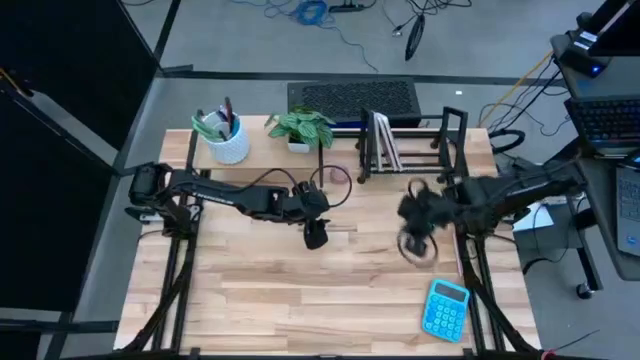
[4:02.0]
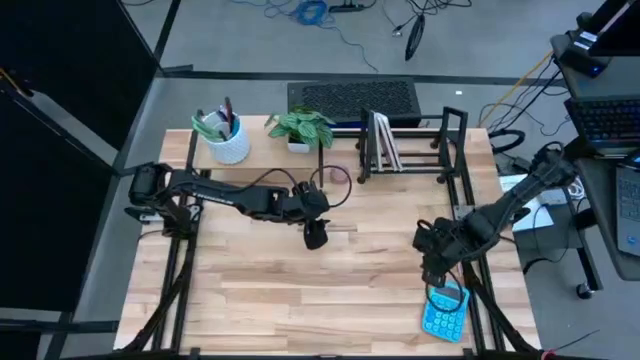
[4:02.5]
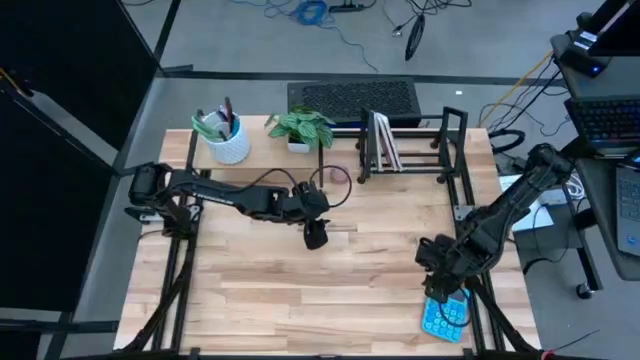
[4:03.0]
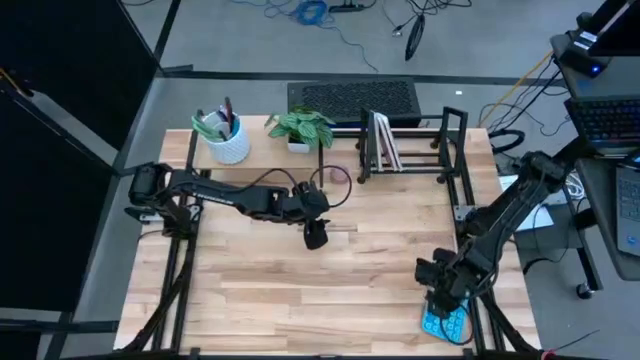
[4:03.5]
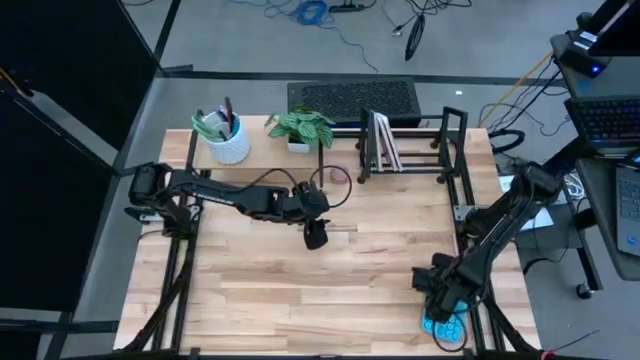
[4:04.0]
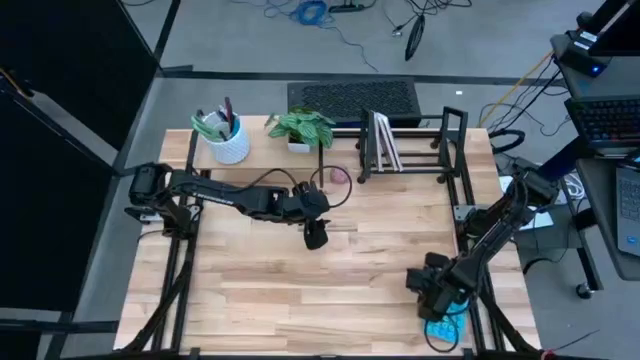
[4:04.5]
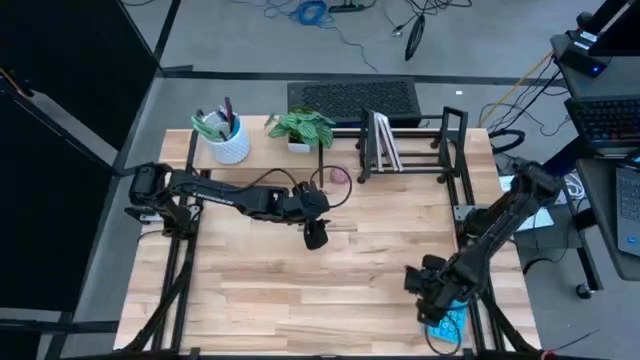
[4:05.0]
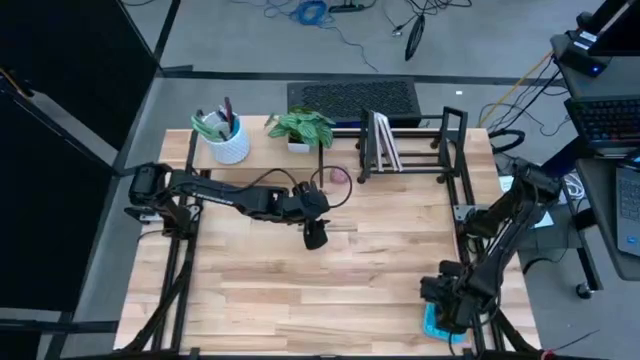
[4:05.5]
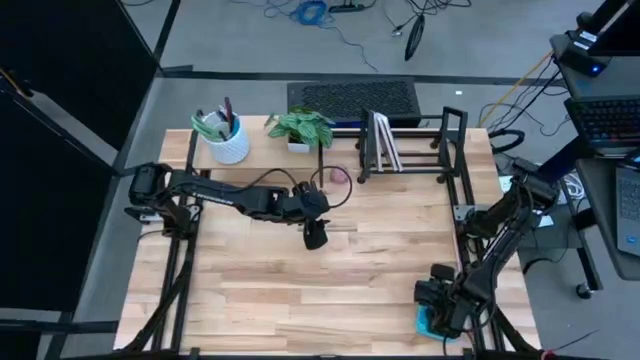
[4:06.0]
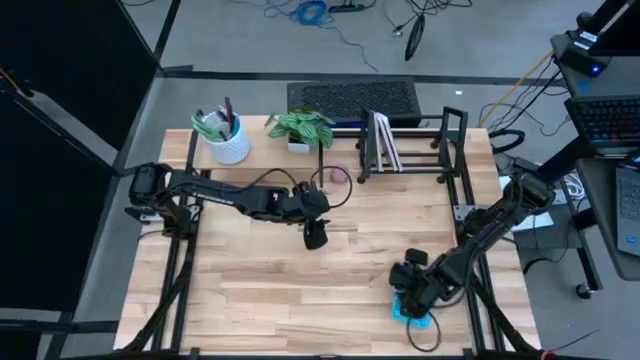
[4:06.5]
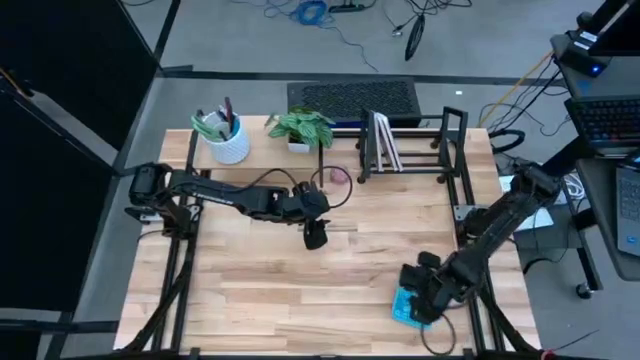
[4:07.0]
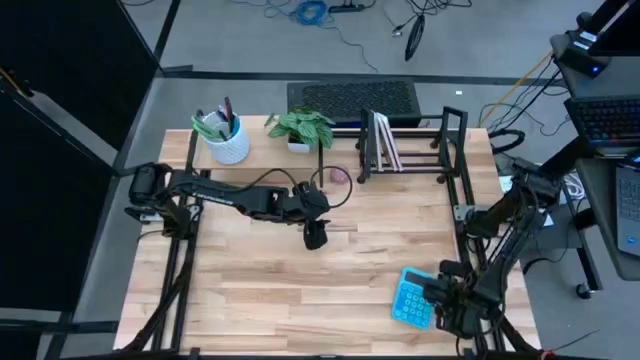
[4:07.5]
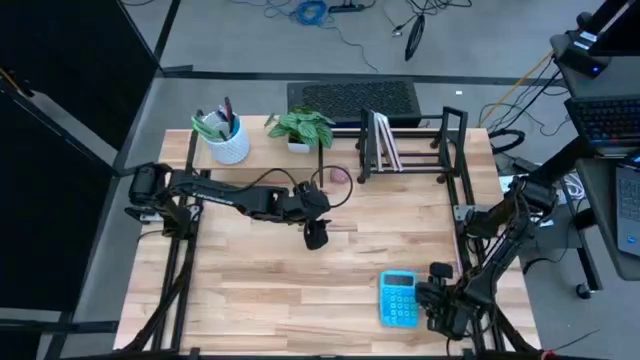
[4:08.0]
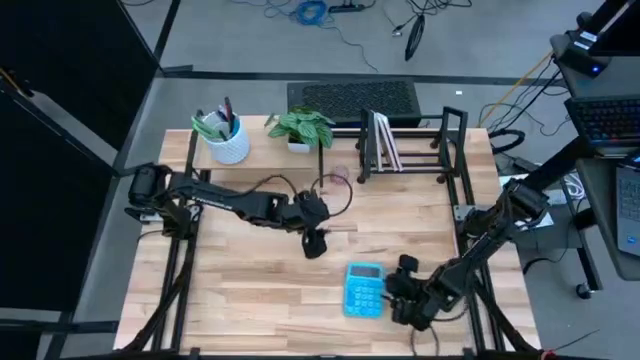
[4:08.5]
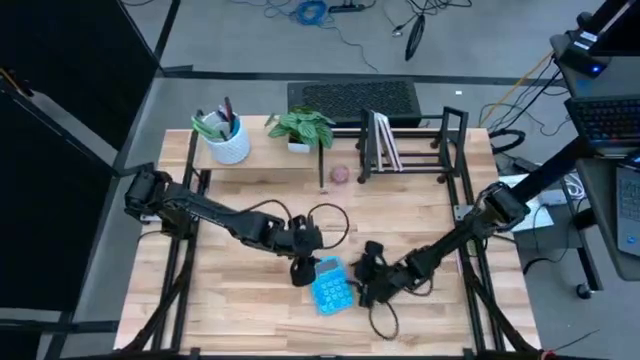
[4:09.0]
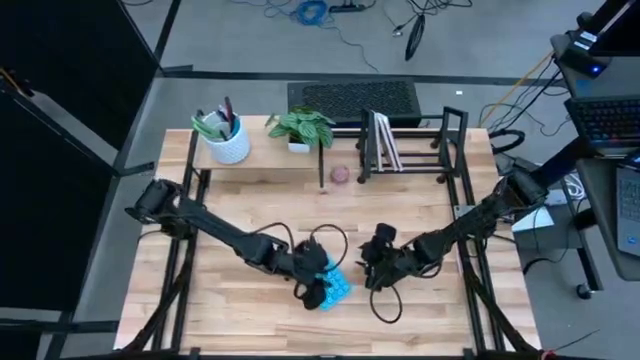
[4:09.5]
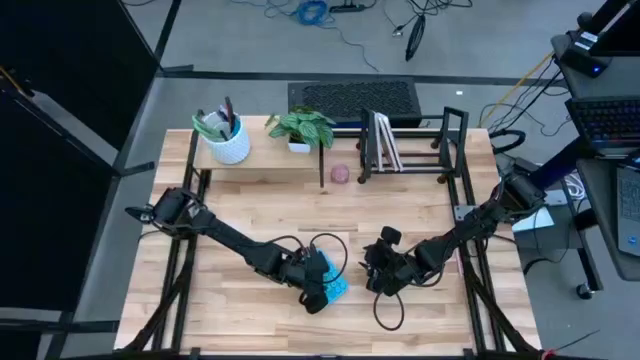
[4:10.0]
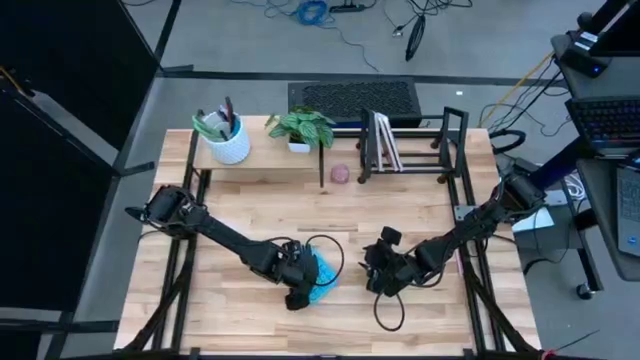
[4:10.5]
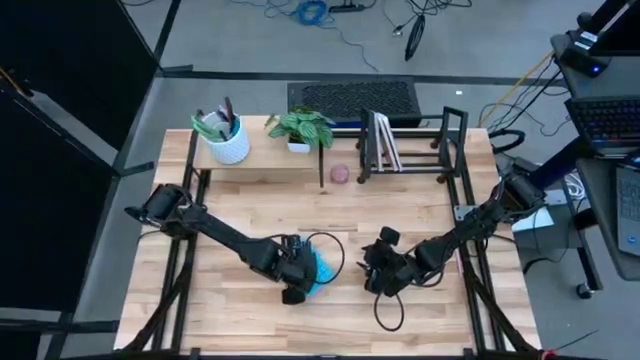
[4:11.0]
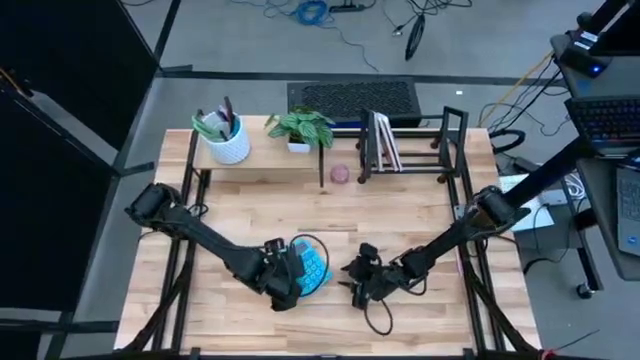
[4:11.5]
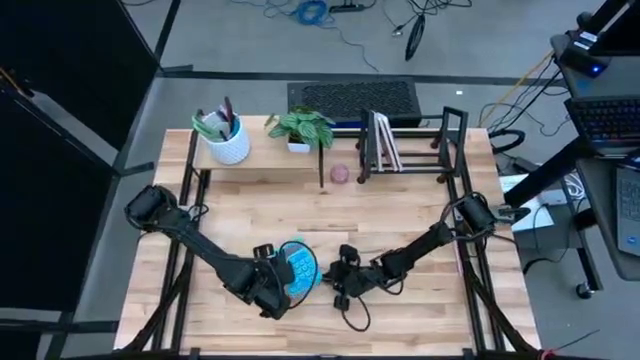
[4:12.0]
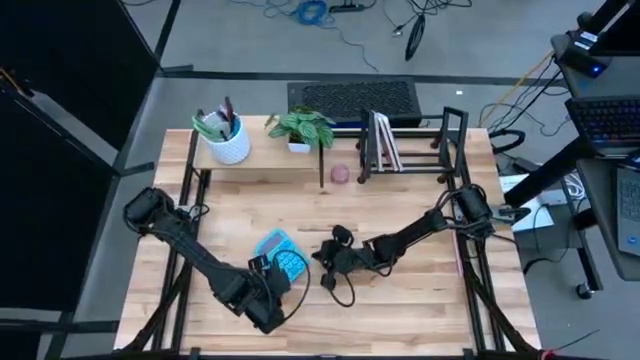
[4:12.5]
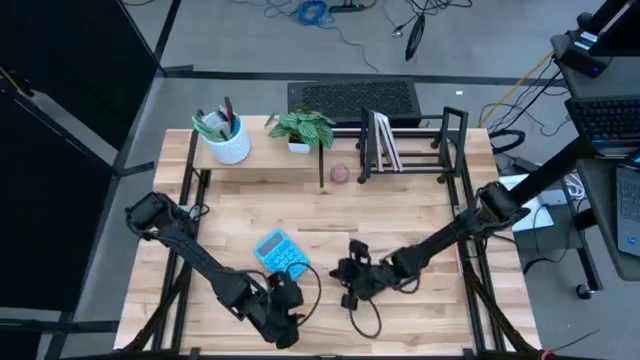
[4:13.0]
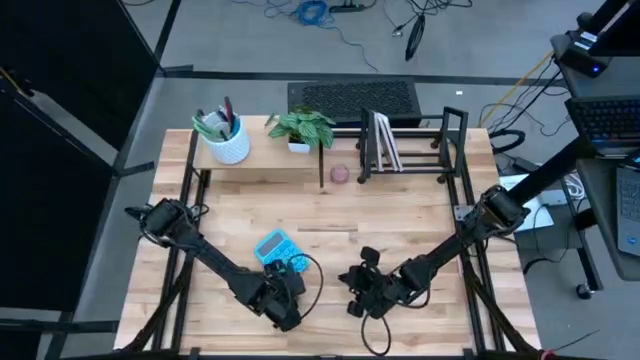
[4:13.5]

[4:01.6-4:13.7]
Task: Stock shelves
Put the blue calculator under the shelf

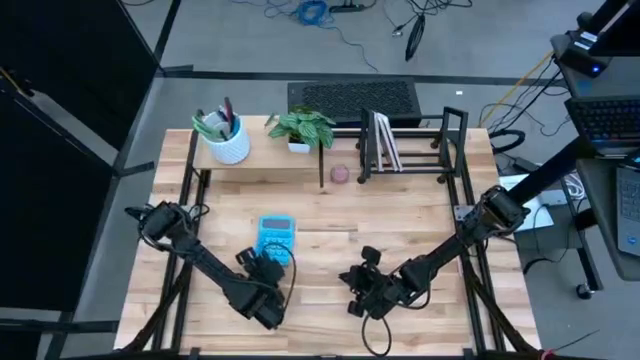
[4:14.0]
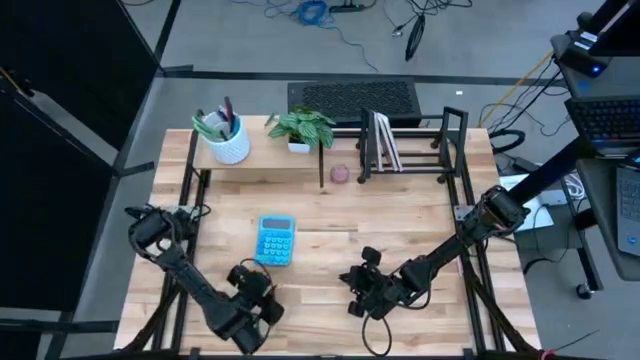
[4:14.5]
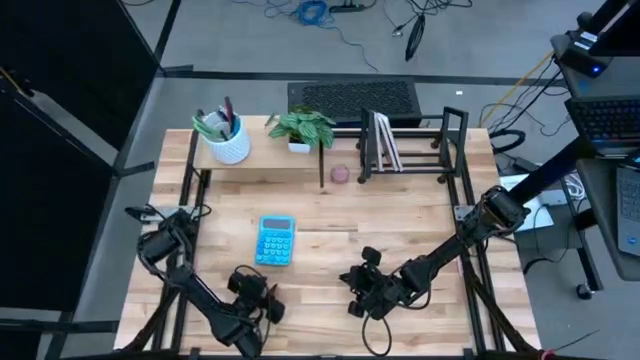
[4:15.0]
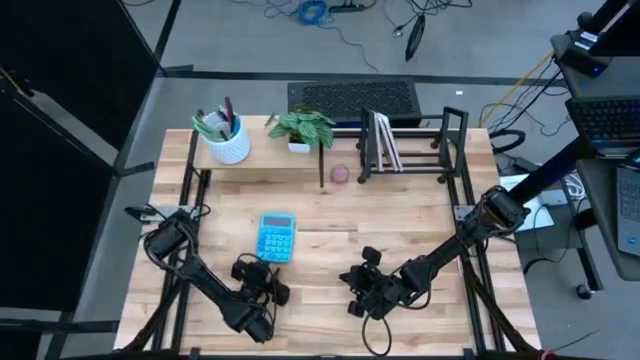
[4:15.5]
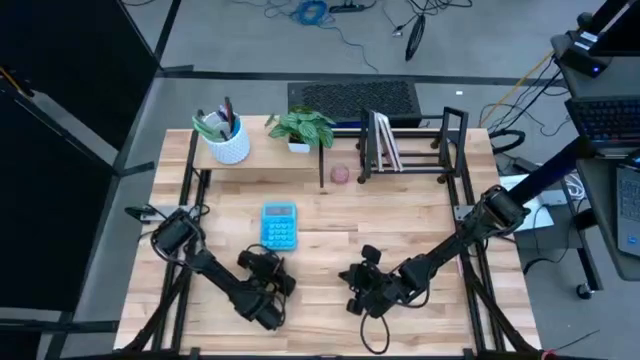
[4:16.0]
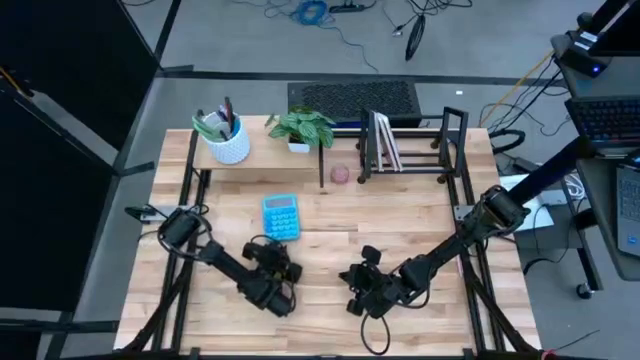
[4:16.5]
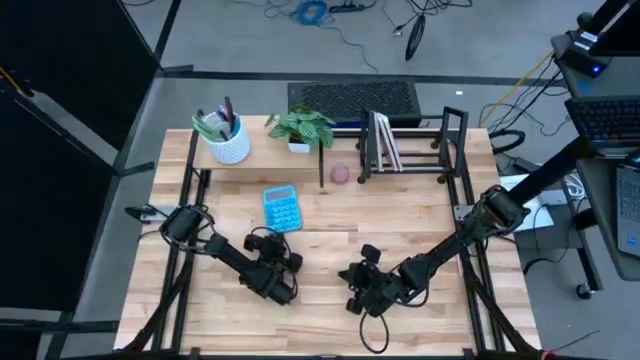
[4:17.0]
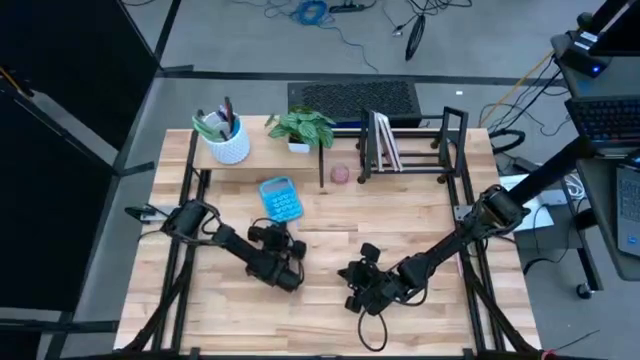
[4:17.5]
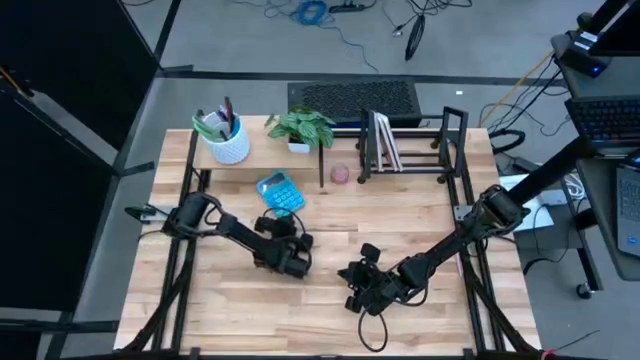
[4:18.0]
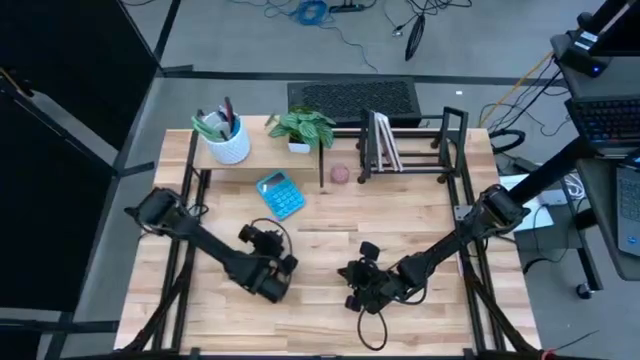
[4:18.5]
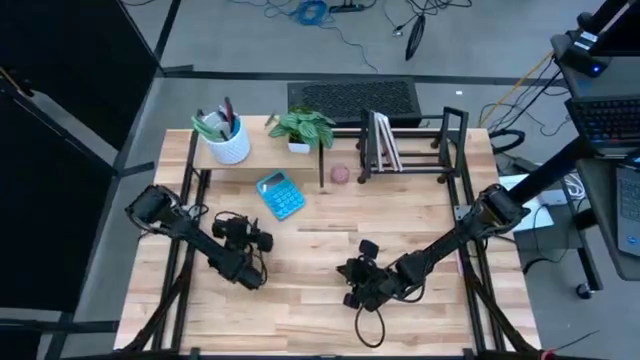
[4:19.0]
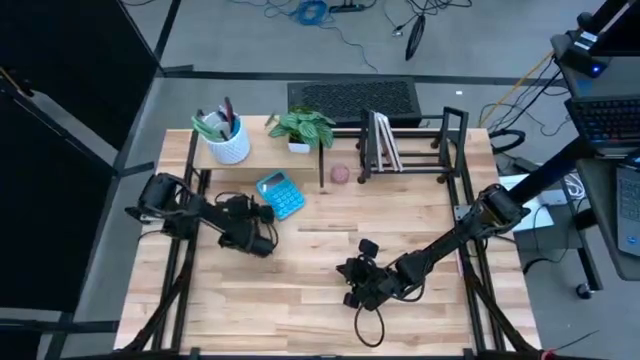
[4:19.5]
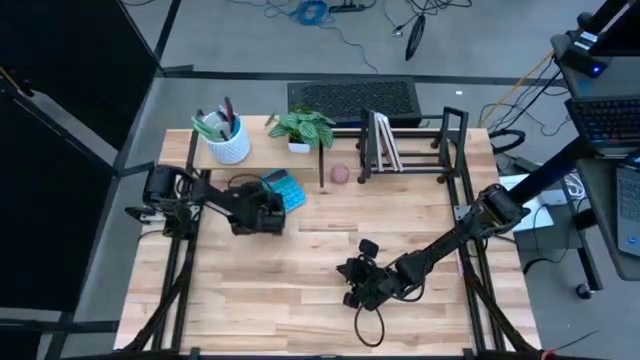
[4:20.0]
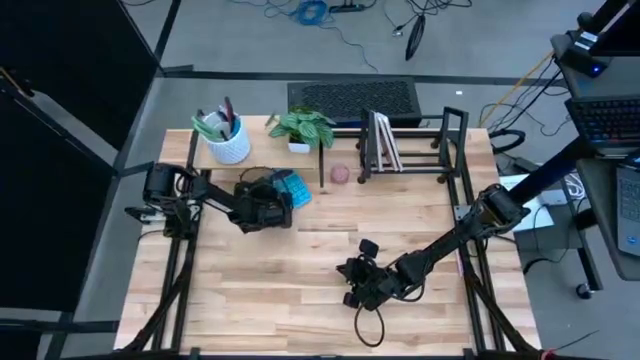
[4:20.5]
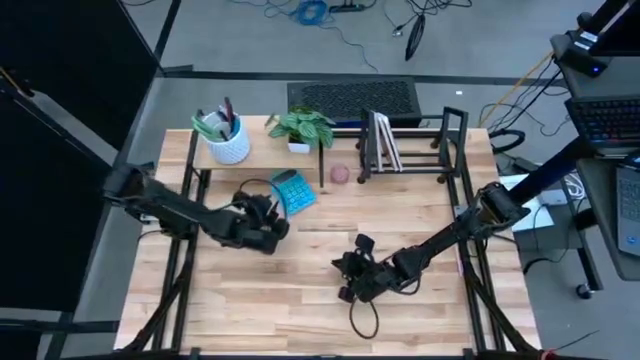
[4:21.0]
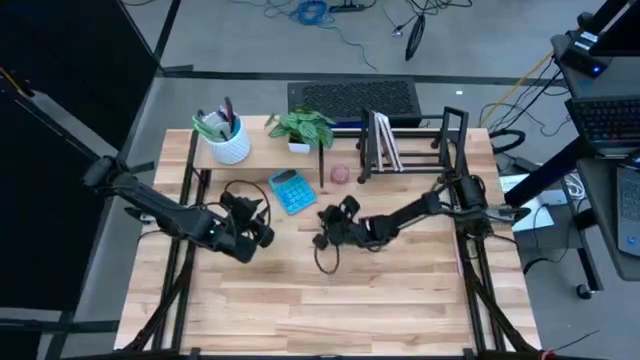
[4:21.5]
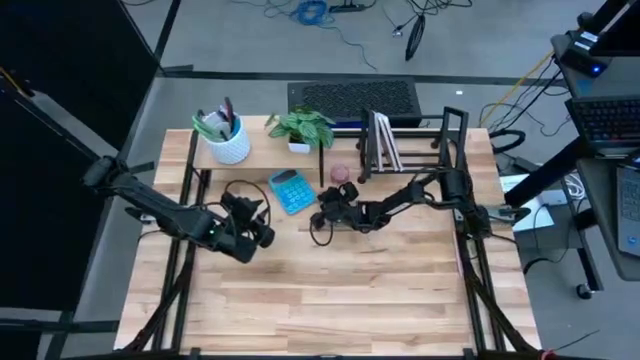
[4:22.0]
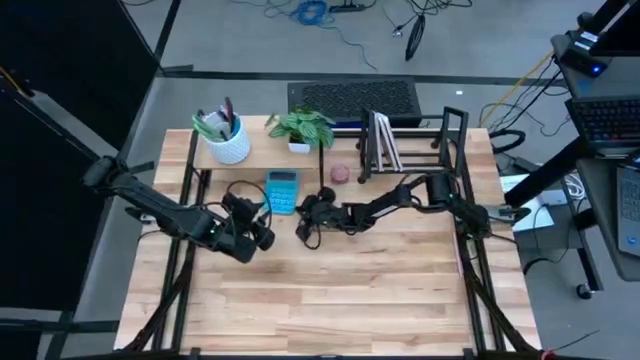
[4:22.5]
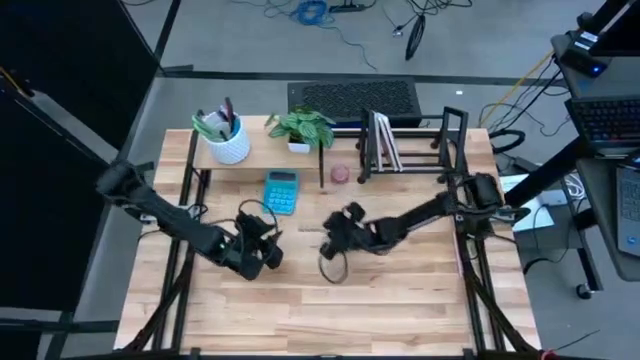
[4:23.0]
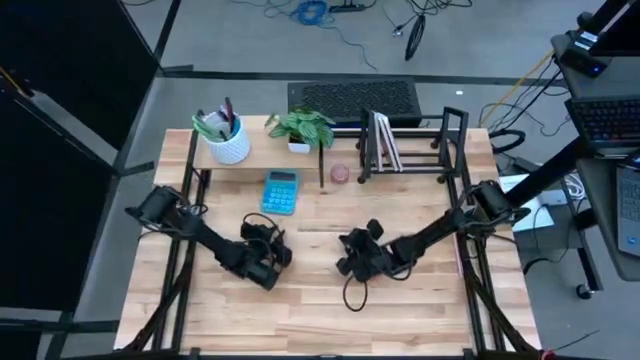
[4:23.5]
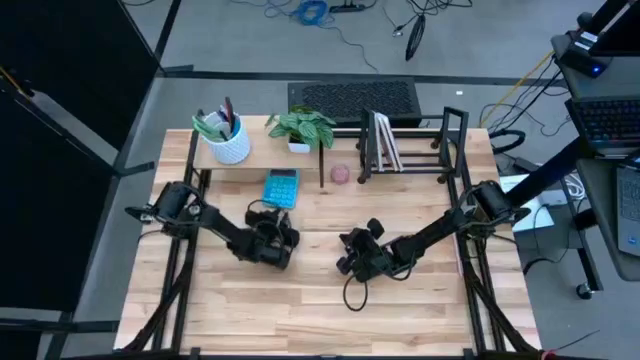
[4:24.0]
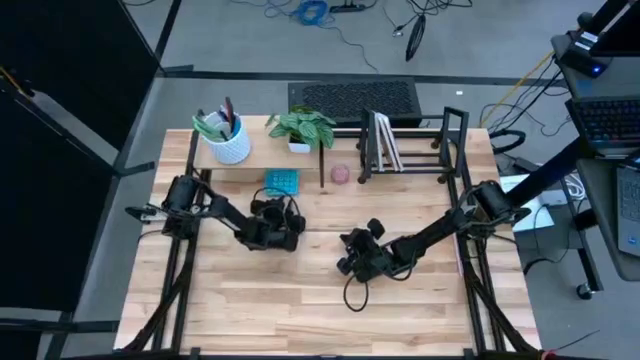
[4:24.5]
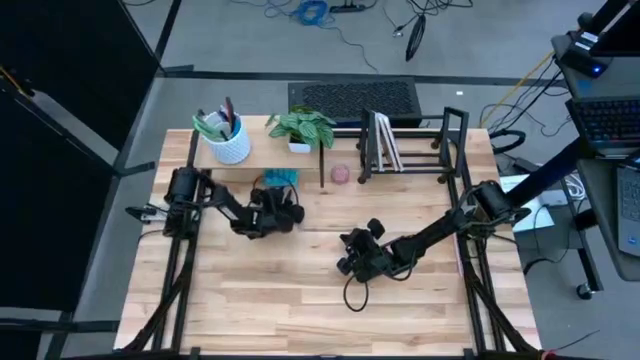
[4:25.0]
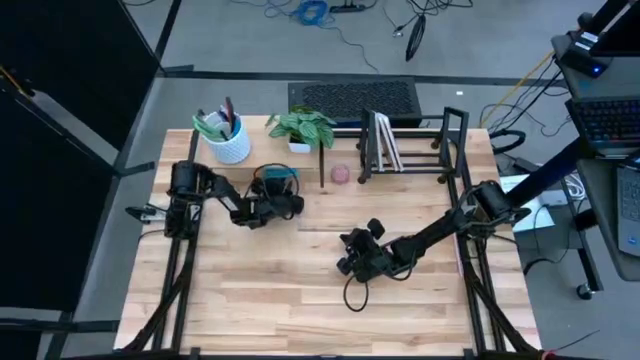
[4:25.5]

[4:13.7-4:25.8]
Put the blue calculator under the shelf
